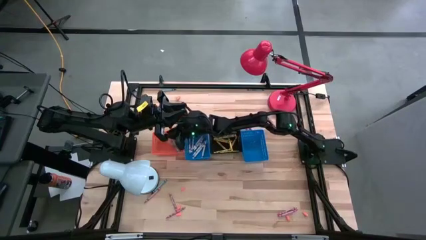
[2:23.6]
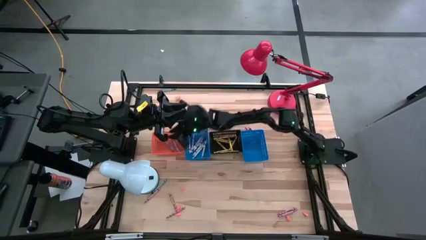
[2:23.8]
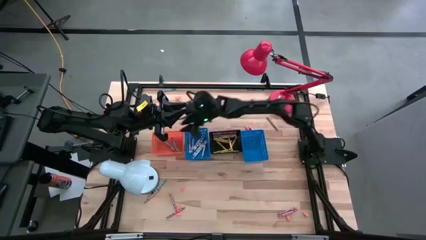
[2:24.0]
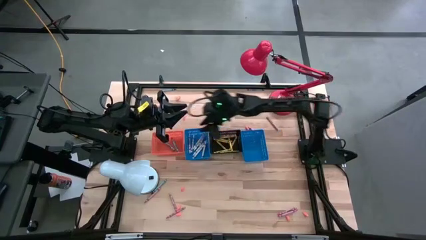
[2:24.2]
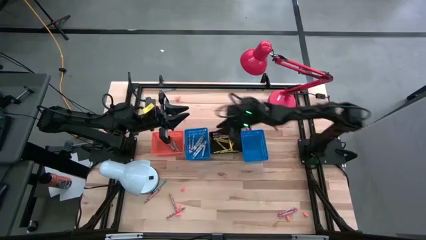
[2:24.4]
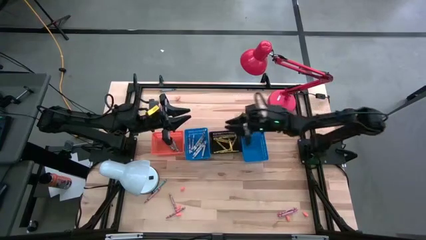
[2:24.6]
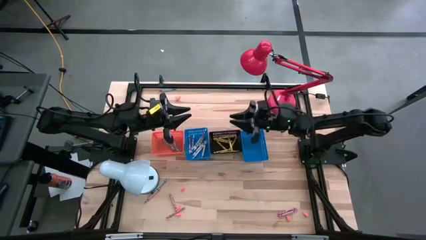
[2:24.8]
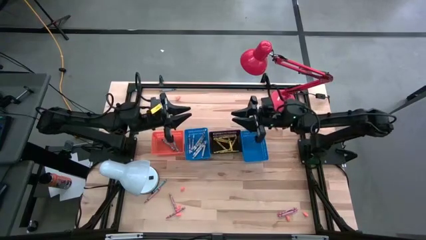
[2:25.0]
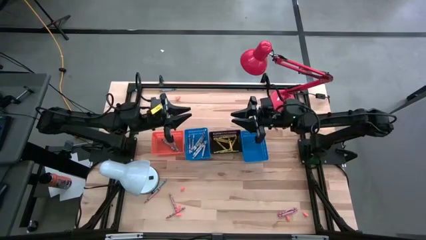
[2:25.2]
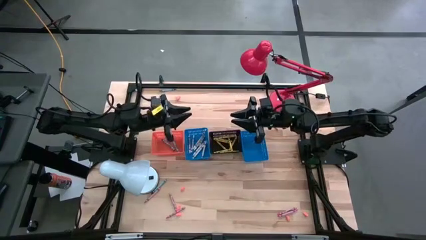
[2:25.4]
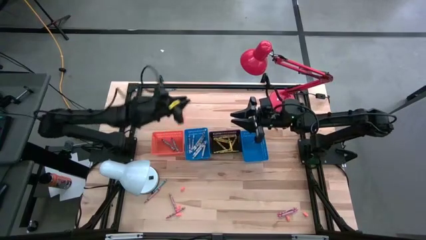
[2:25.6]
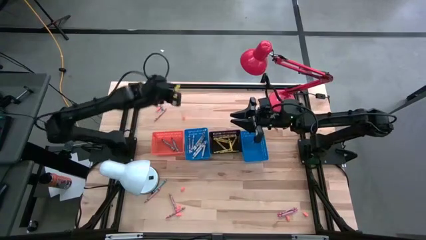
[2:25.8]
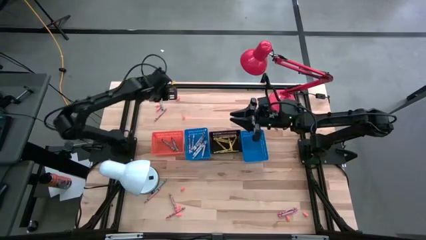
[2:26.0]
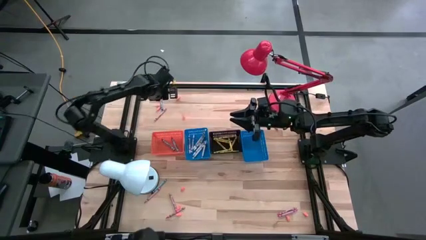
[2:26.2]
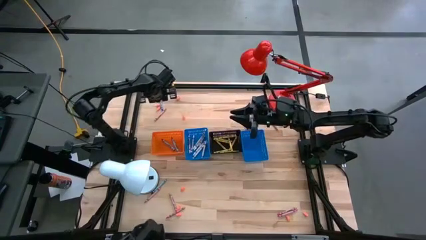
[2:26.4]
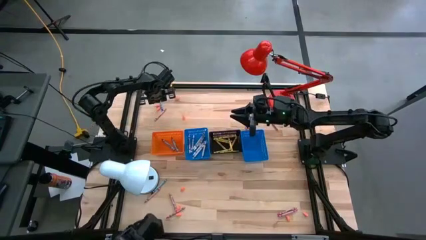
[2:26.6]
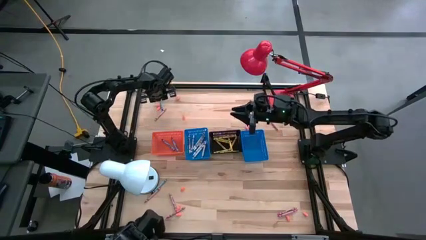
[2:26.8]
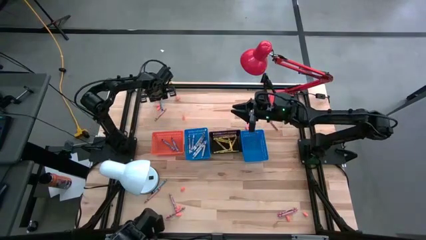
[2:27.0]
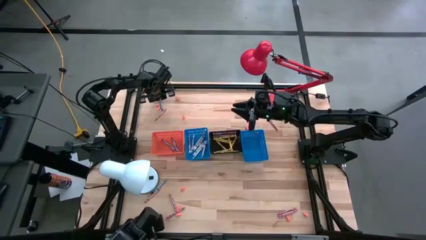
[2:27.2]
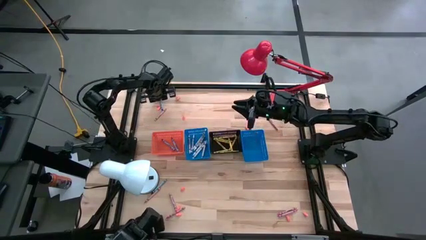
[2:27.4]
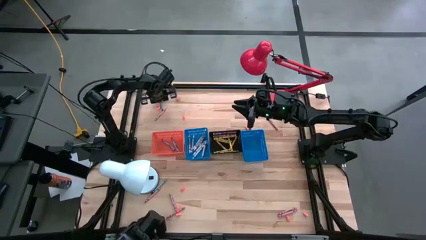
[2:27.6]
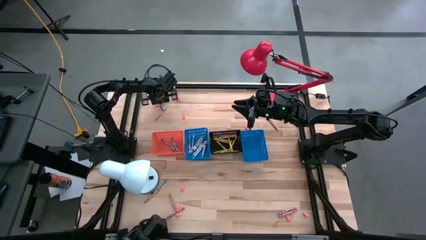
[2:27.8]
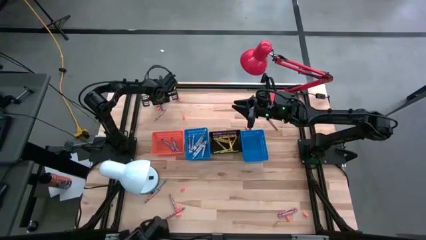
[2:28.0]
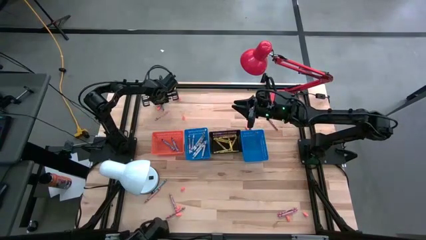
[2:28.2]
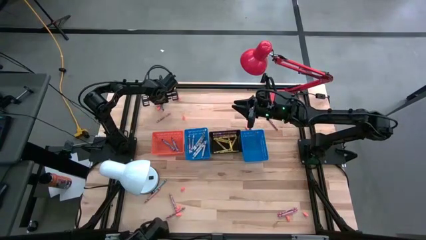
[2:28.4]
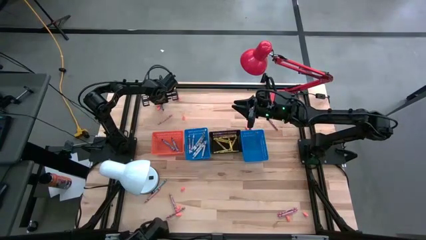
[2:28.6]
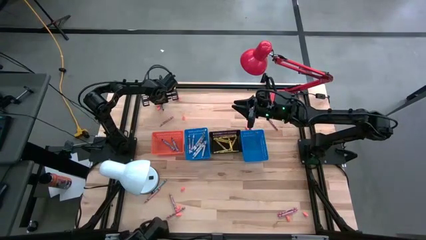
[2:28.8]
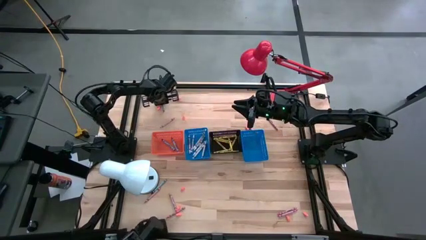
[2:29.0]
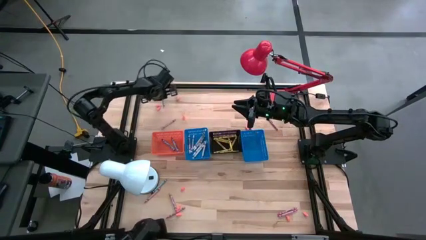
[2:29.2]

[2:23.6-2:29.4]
Task: Sort crayons
Put the blue crayon into the orange bin

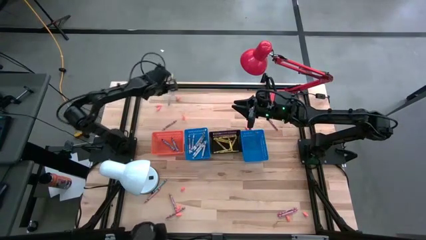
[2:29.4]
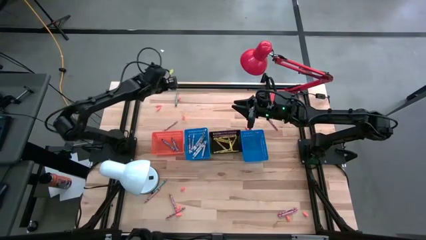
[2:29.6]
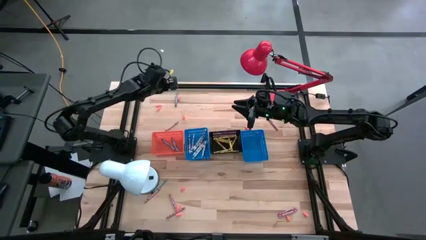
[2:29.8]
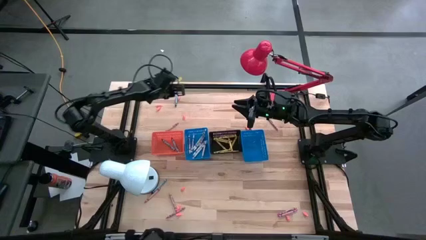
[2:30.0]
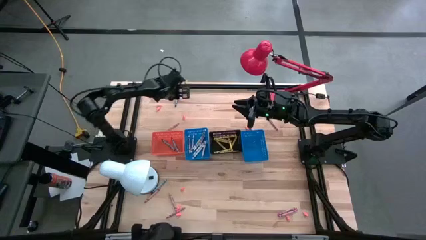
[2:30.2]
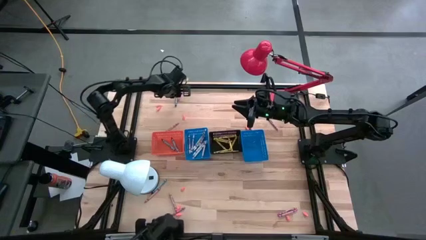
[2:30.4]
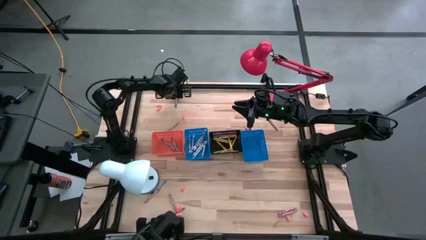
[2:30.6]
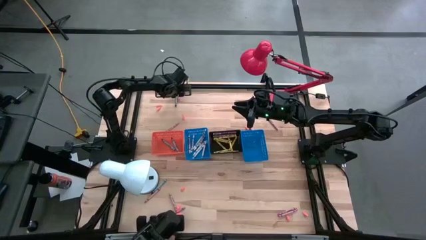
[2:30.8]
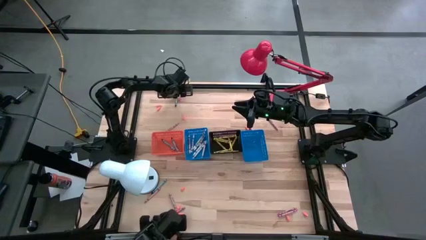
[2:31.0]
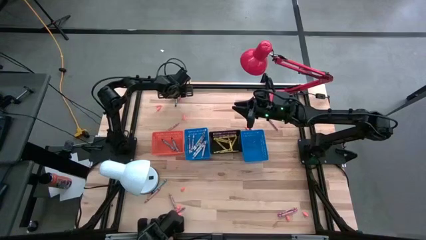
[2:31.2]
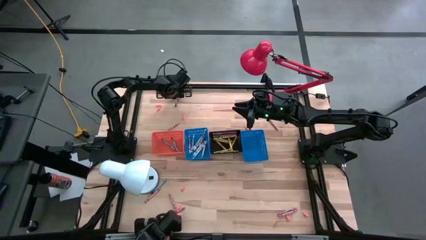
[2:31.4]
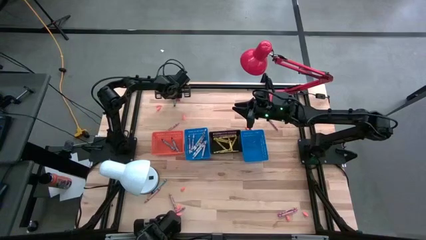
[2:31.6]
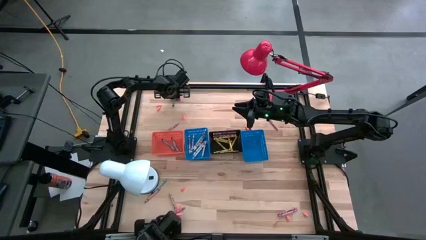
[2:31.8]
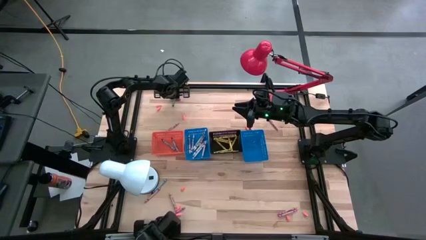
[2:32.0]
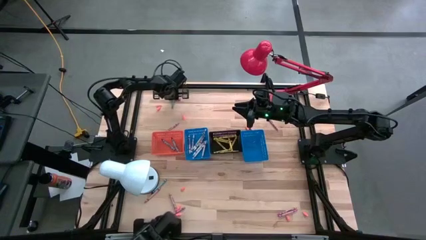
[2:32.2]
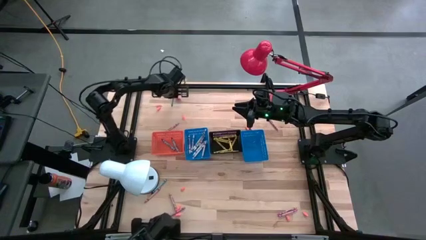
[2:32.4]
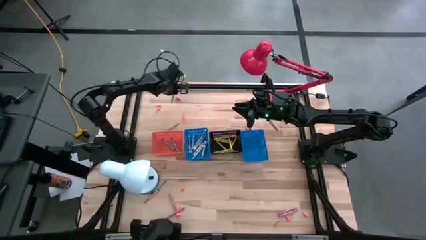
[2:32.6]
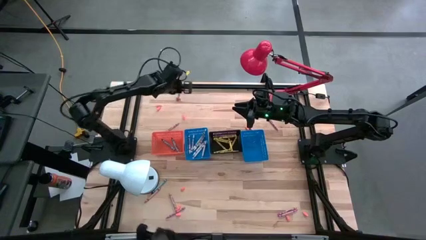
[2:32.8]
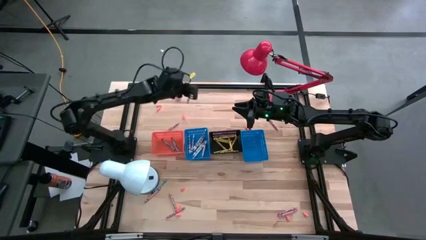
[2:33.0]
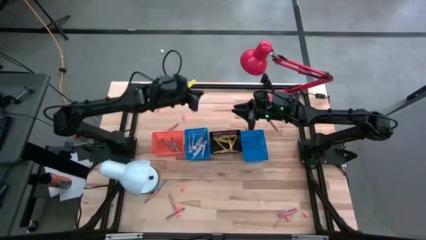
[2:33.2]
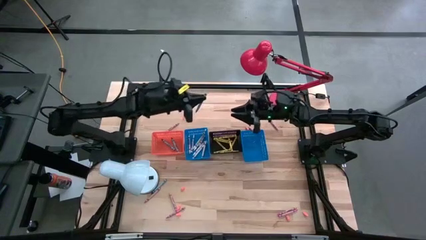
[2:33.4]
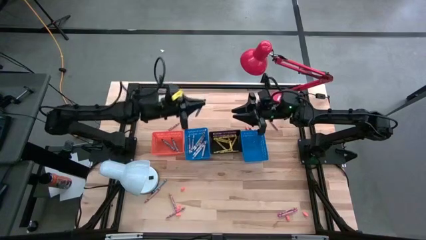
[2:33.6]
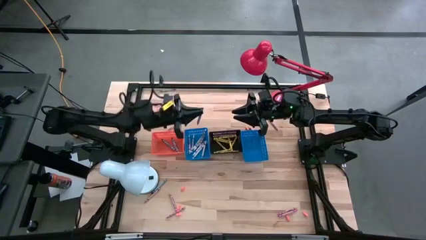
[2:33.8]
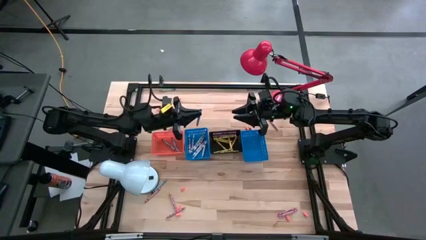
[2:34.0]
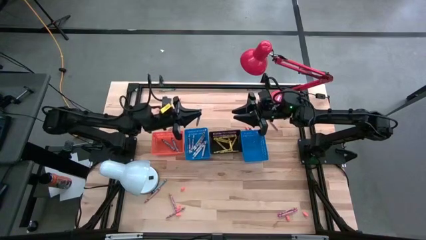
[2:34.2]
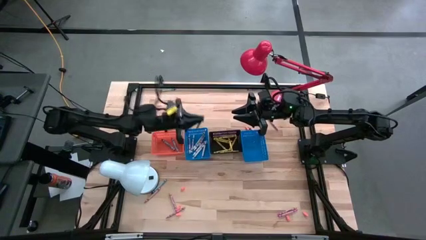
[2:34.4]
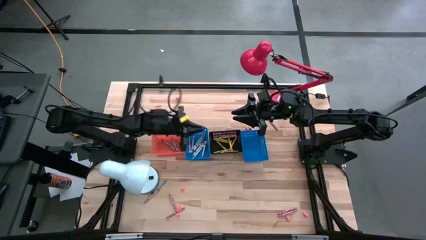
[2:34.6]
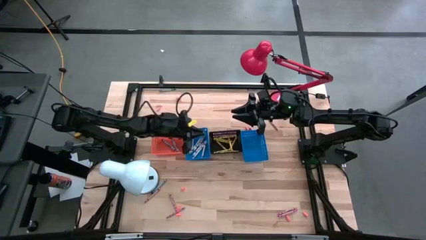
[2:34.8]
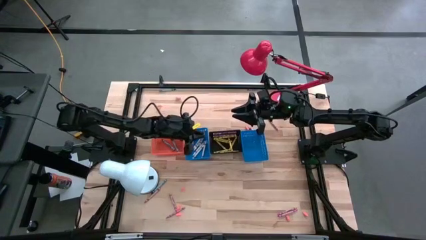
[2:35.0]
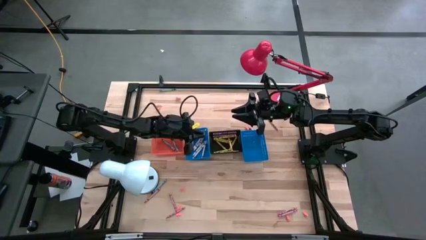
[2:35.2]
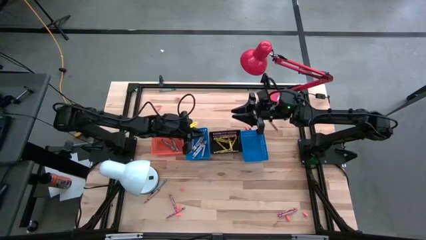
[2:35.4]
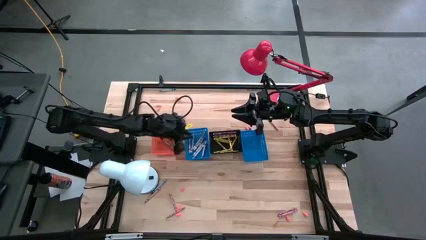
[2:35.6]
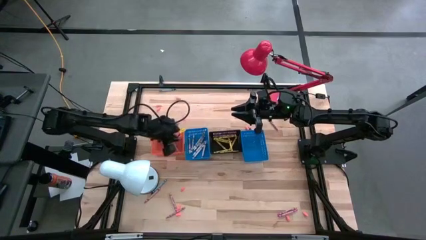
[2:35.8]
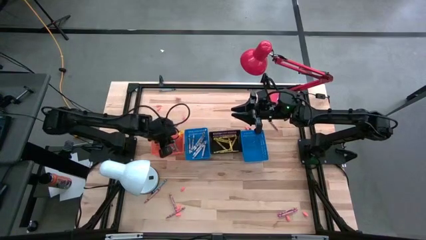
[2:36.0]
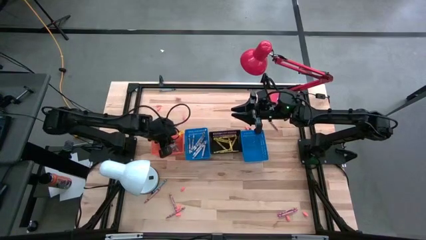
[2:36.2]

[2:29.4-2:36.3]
Put the blue crayon into the orange bin
